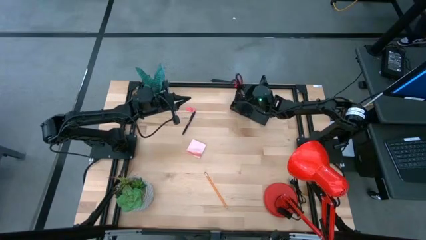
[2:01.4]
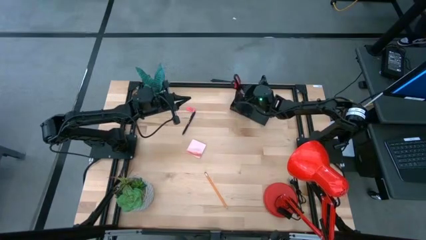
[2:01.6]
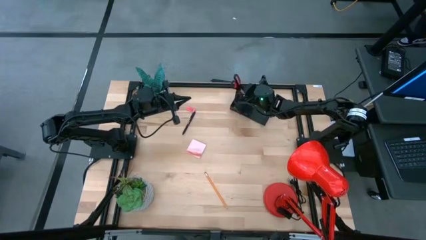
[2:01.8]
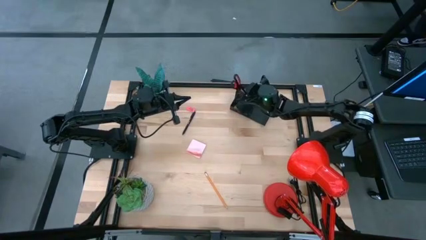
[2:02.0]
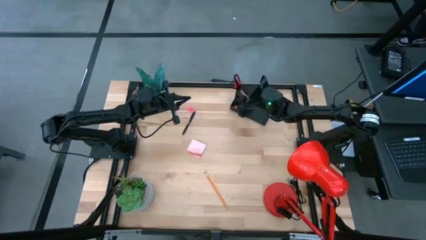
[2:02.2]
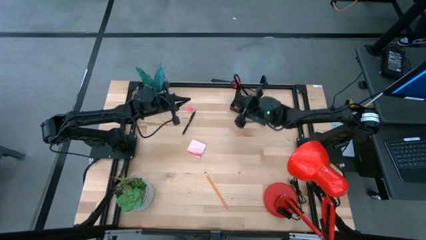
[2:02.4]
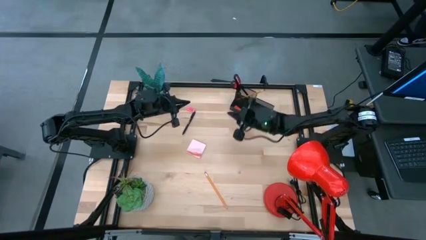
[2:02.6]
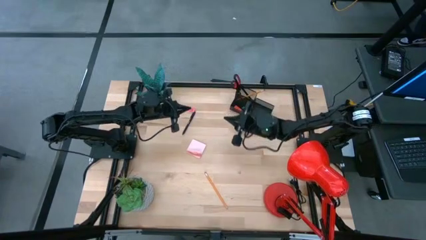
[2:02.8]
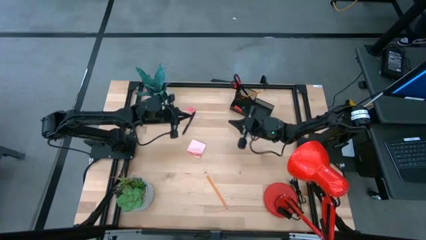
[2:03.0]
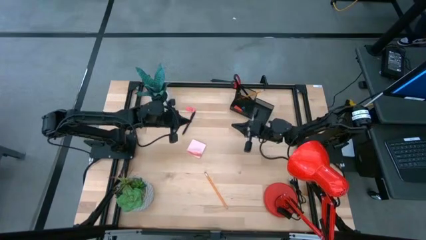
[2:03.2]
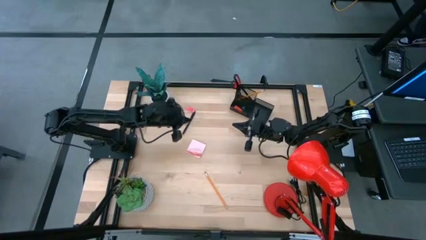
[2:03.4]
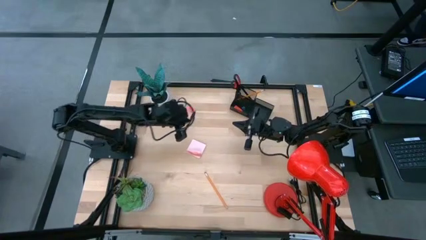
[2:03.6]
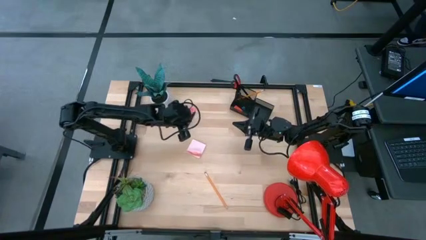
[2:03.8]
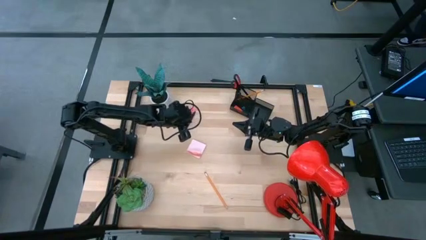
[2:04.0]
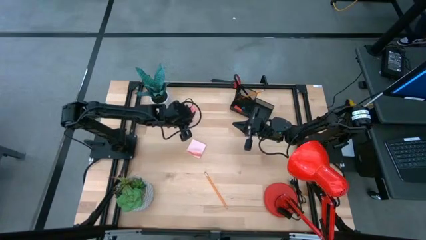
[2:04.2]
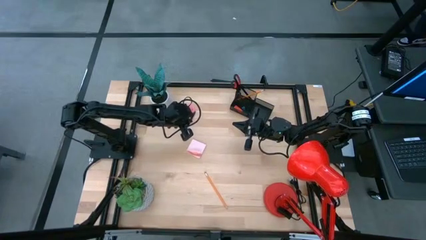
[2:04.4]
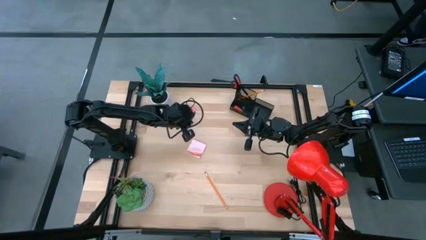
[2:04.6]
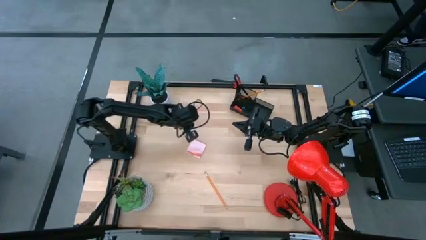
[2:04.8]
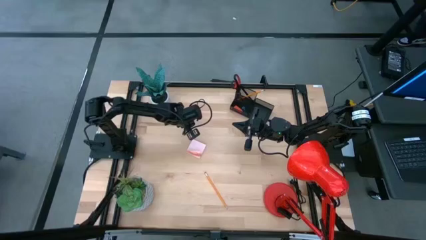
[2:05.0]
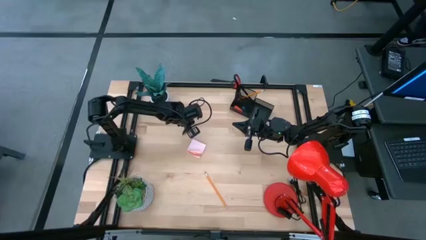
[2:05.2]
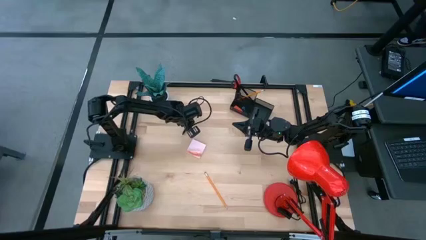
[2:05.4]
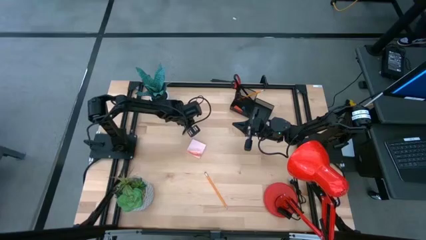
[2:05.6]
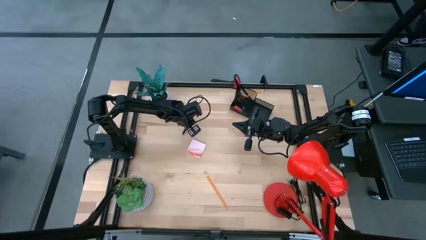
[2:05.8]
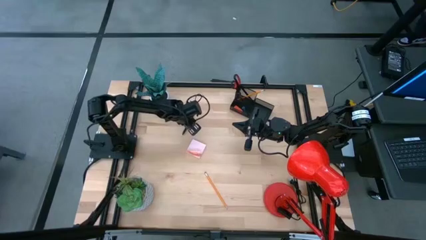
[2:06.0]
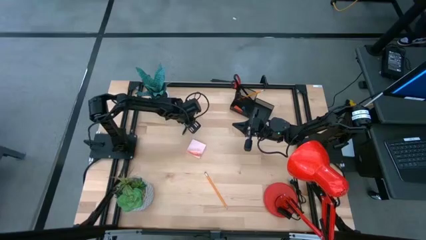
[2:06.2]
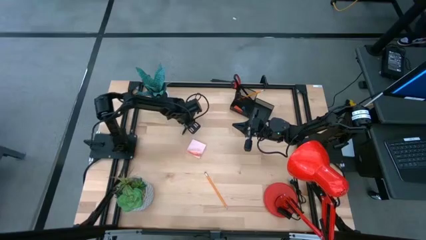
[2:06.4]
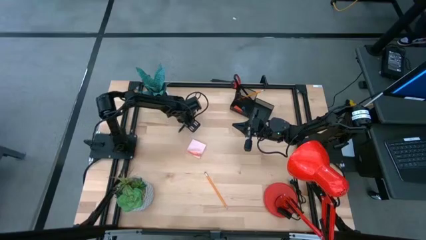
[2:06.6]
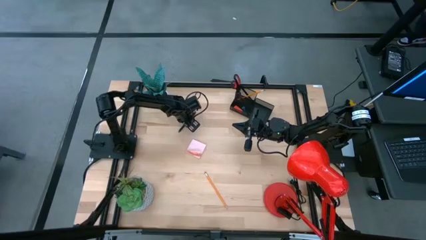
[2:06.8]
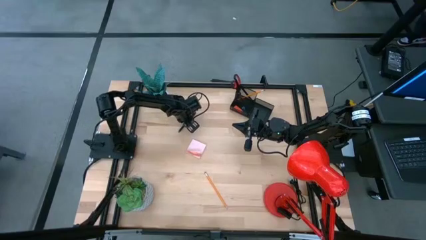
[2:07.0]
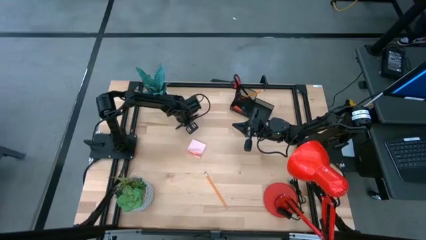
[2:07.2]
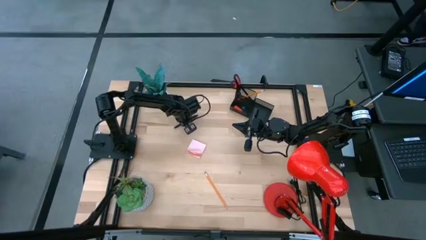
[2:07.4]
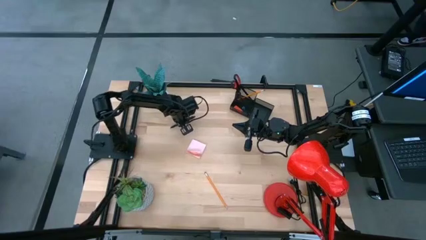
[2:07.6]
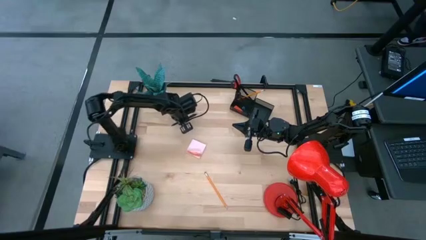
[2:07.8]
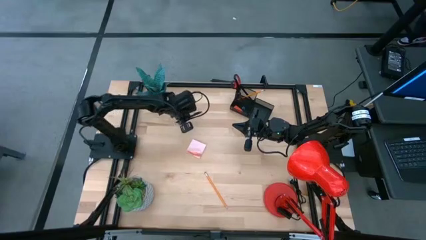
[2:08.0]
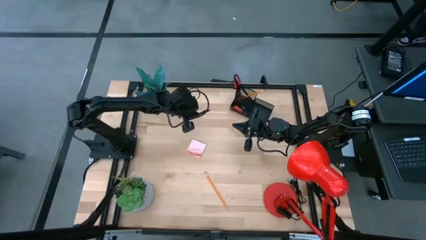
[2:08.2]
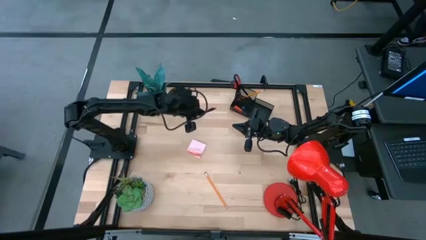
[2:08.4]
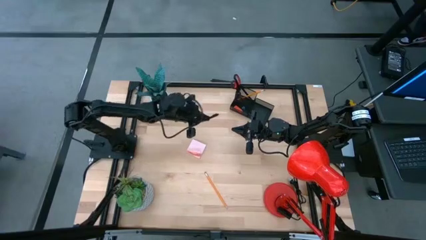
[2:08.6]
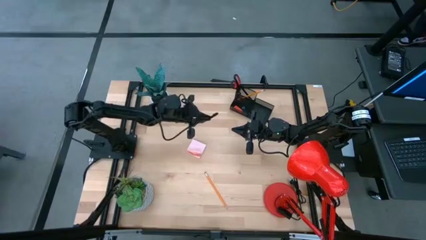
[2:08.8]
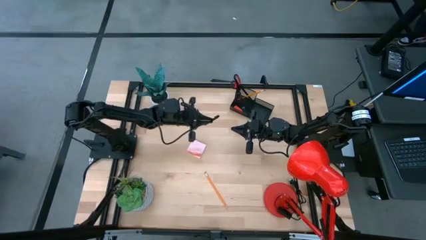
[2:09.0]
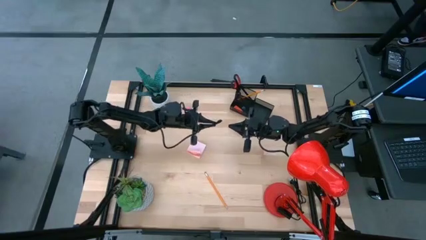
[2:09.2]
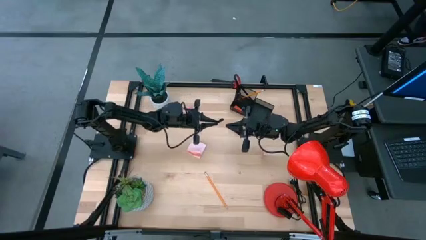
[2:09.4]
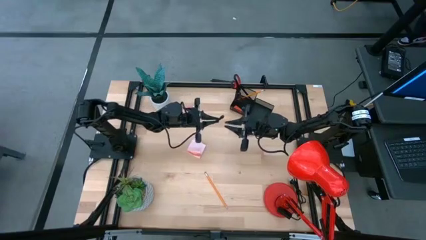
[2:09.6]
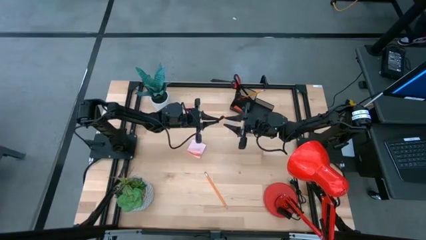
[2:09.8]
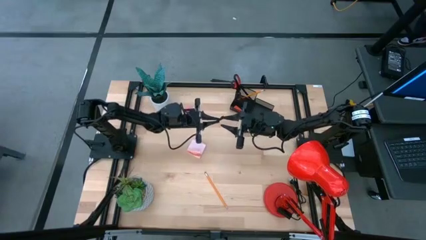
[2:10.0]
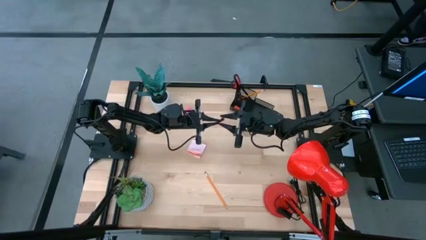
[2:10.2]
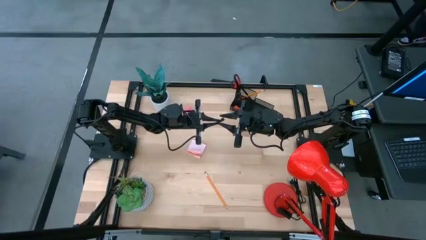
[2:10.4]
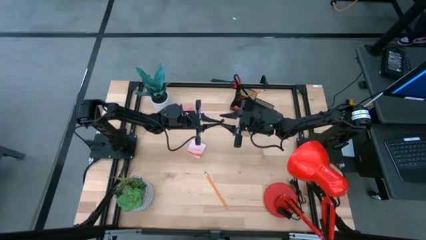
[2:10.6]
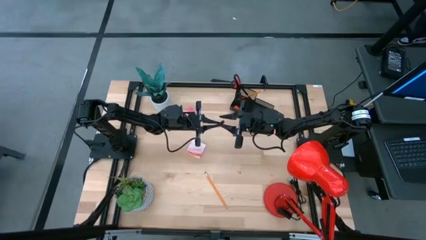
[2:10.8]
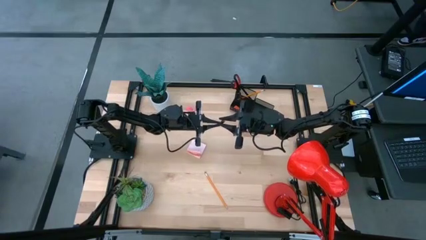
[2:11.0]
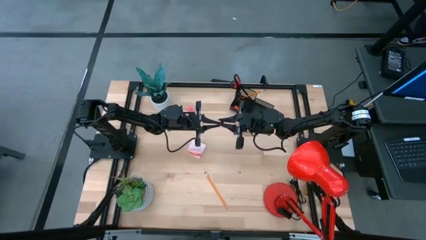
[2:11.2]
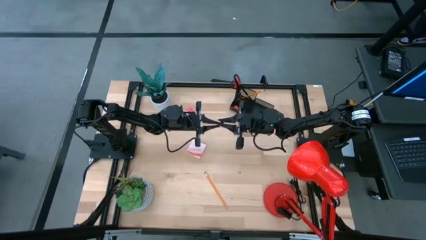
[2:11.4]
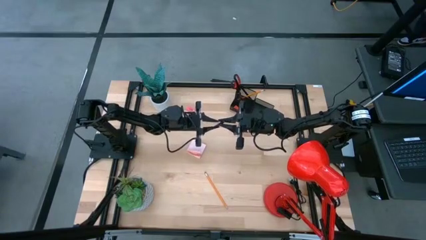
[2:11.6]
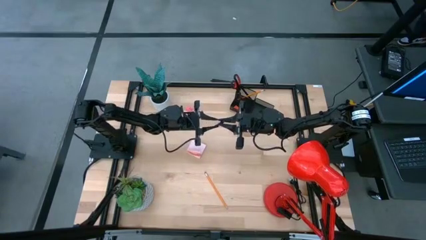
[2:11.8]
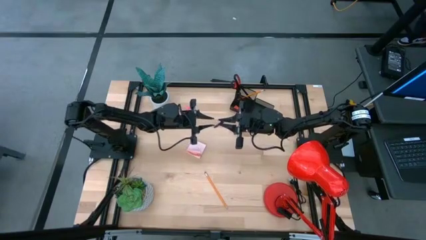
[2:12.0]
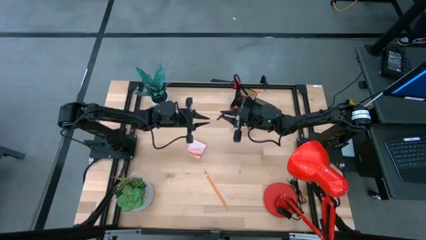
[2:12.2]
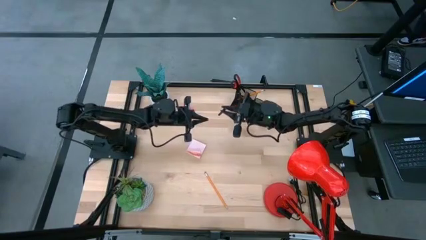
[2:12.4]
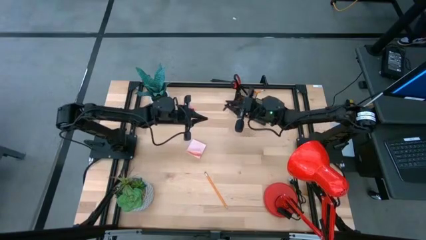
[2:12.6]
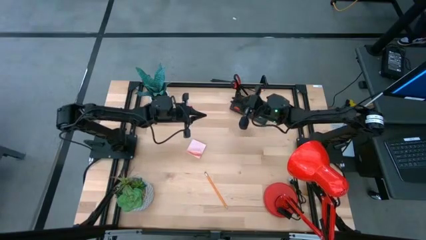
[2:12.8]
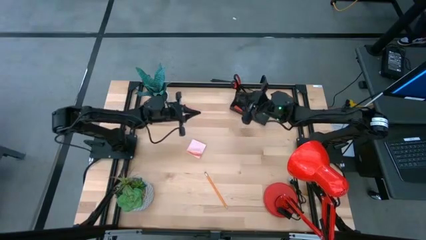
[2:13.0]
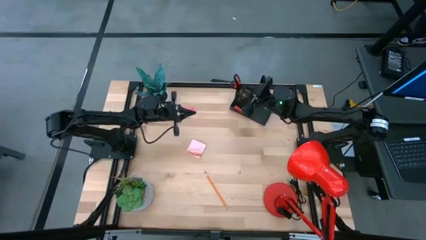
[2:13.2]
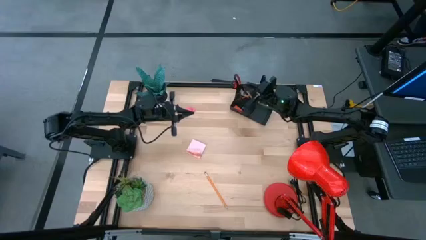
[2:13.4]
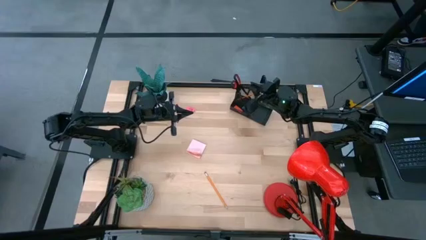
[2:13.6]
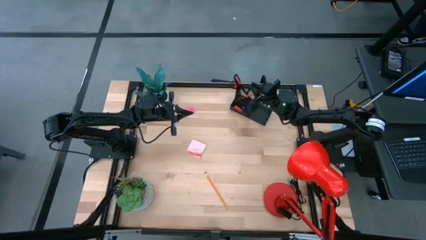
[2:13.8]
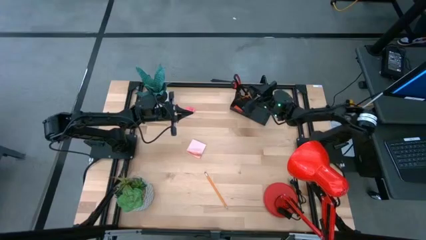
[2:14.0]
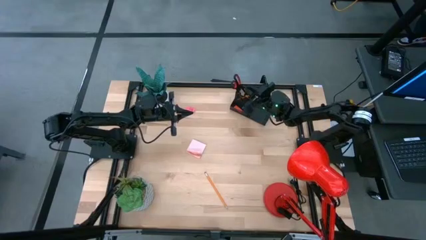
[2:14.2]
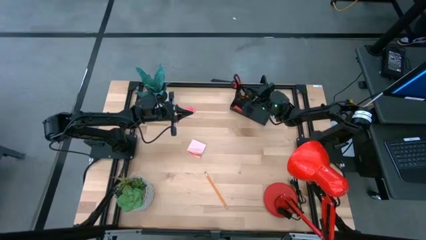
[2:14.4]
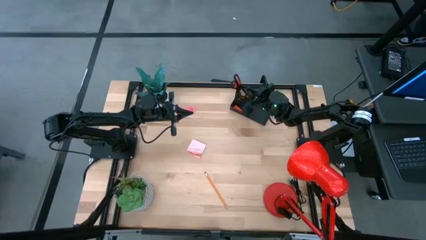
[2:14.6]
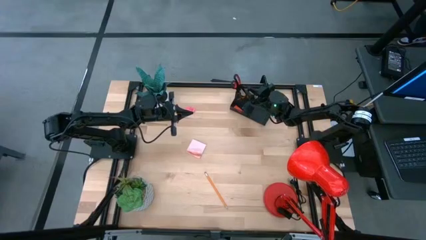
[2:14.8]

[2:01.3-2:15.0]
Task: Pick and place office supplies into organizer
Put the black ballpen into the black desk organizer
